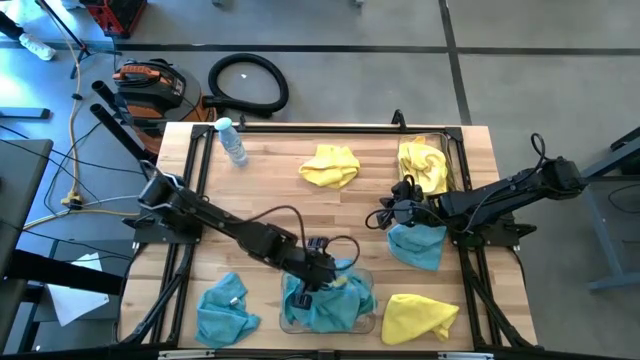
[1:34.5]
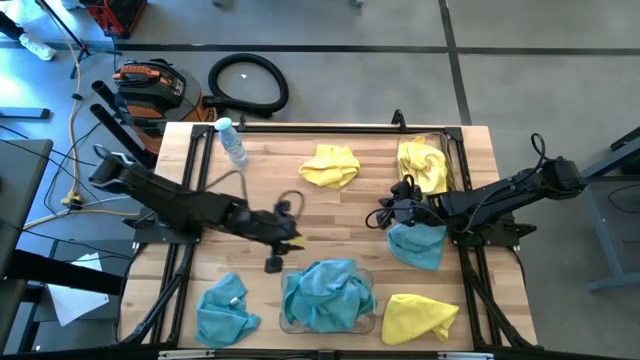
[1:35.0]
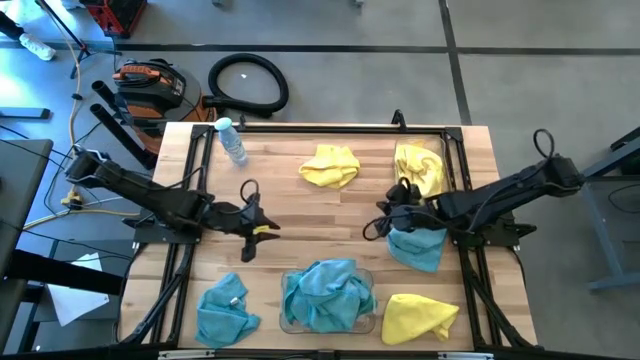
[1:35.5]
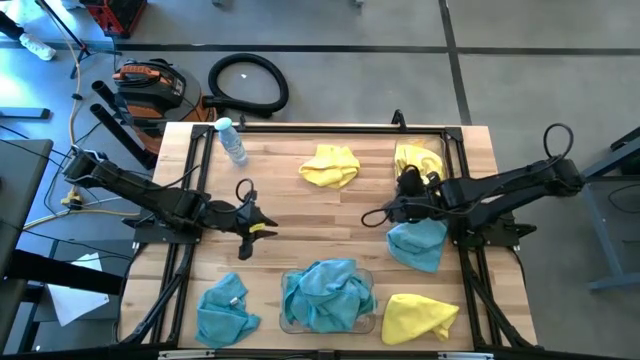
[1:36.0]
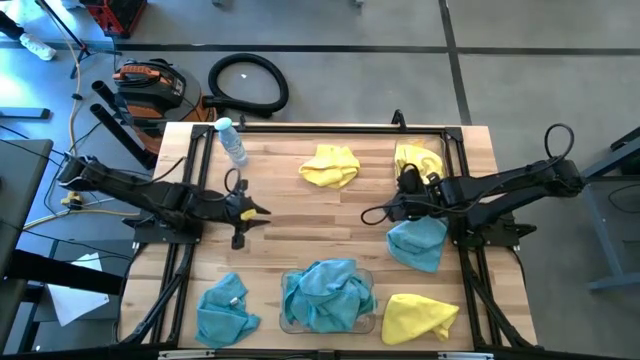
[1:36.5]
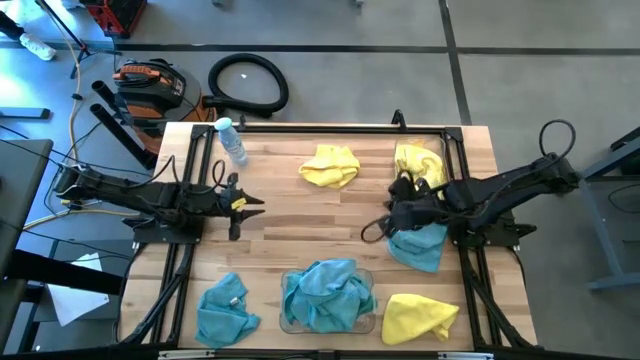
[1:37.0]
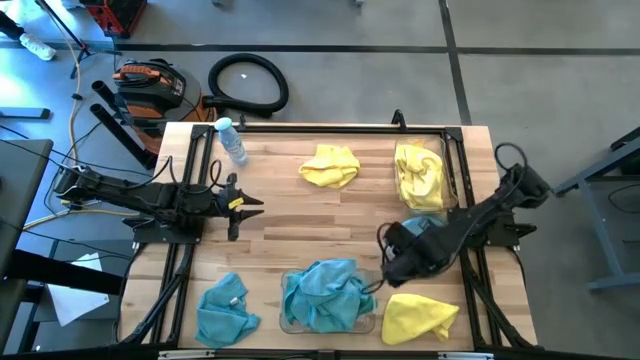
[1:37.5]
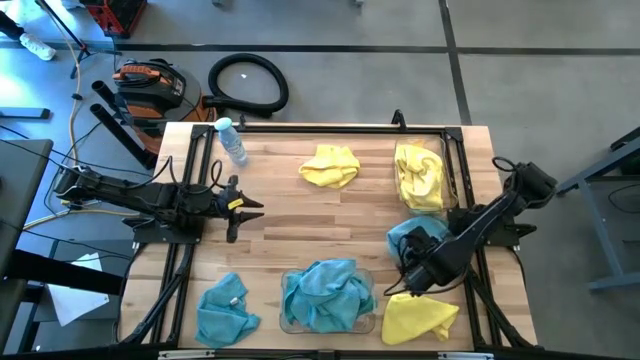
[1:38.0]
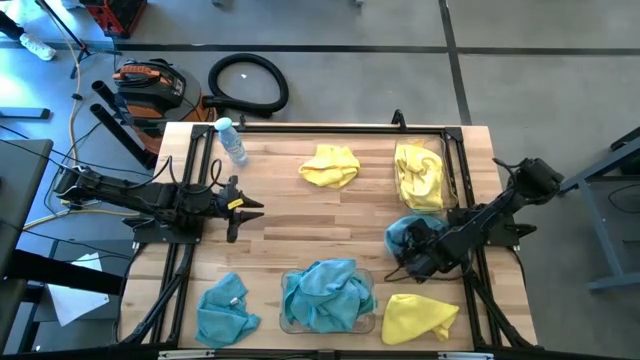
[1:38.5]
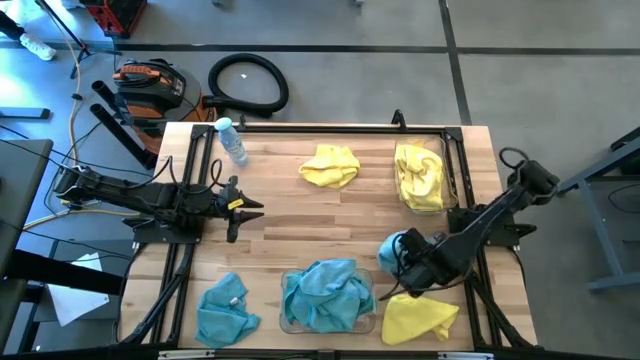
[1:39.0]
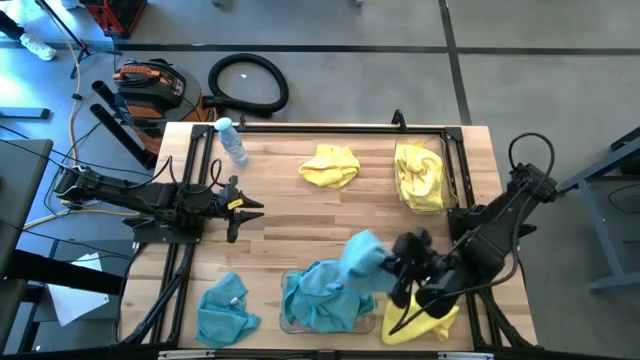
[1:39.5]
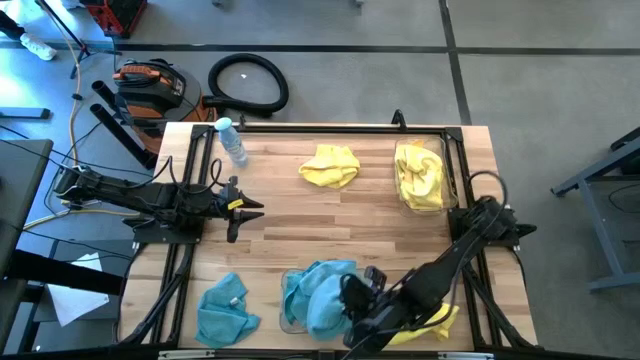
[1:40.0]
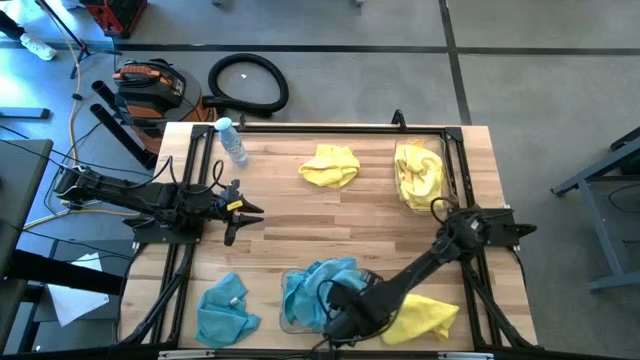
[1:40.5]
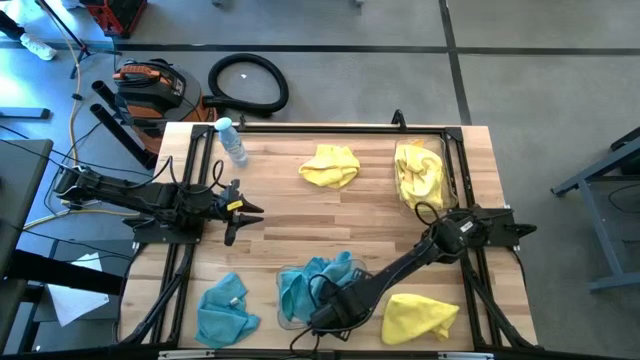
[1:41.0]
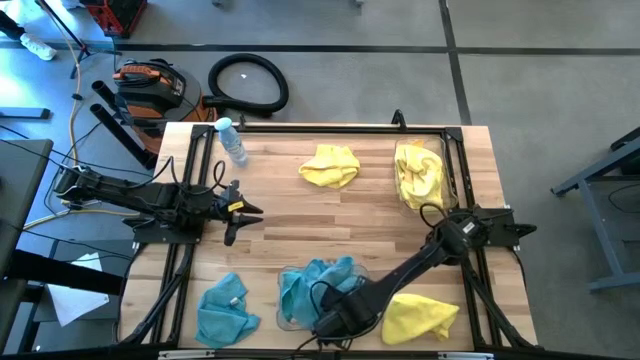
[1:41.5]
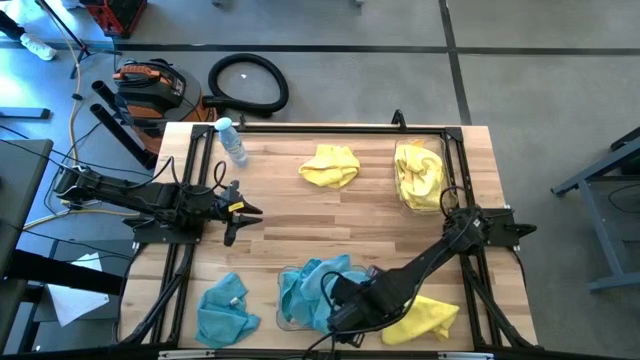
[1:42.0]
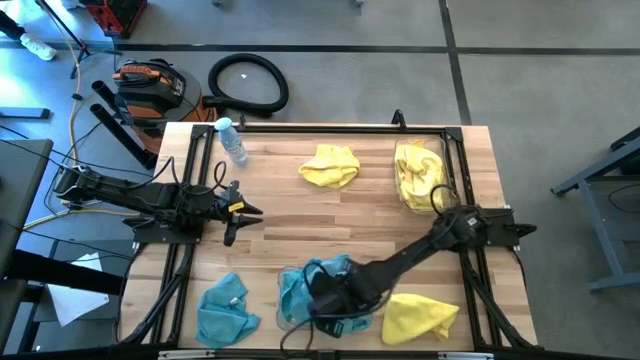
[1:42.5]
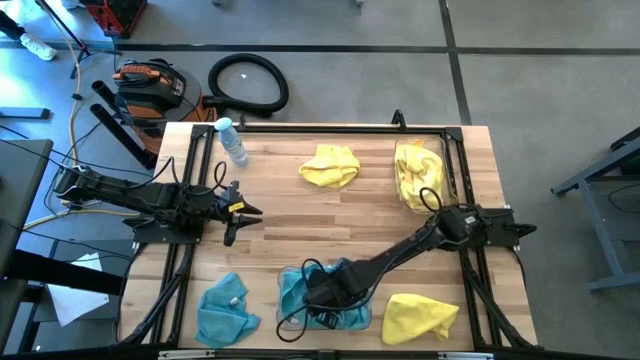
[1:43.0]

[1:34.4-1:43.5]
Task: Sort microfiber towel by color & place in baskets
Put the blue microfiber towel into the bottom transparent bin

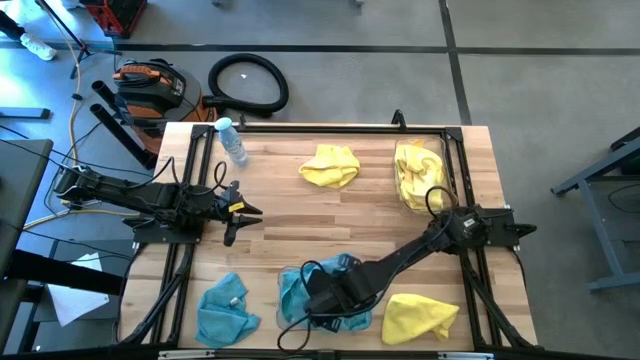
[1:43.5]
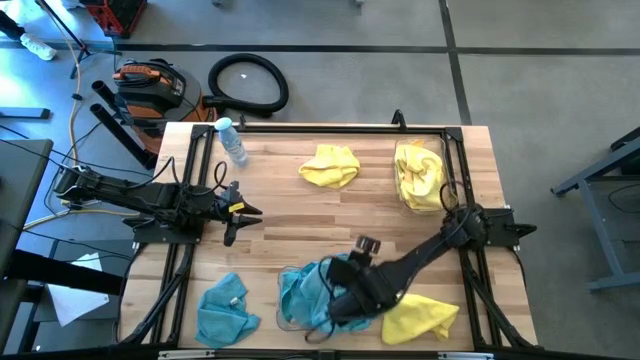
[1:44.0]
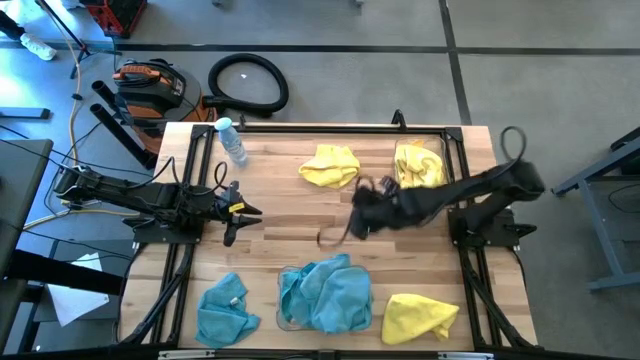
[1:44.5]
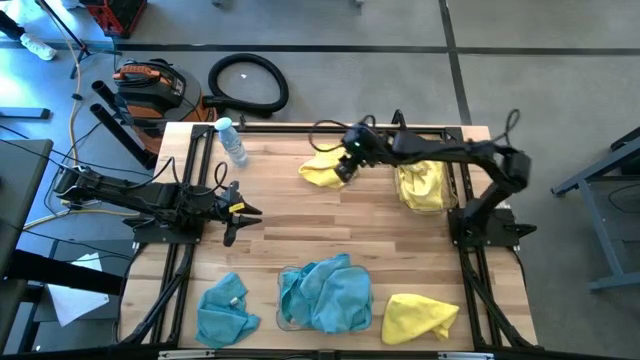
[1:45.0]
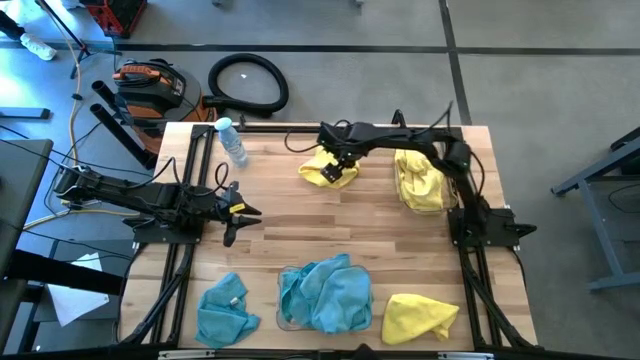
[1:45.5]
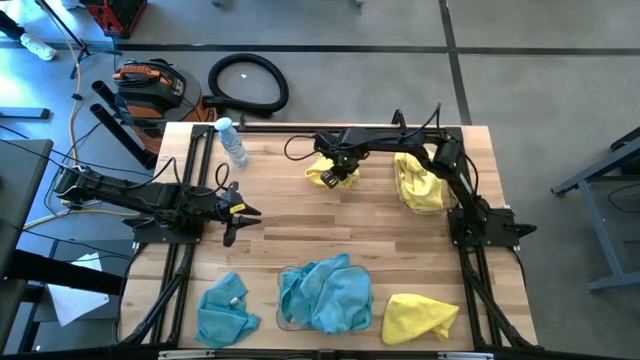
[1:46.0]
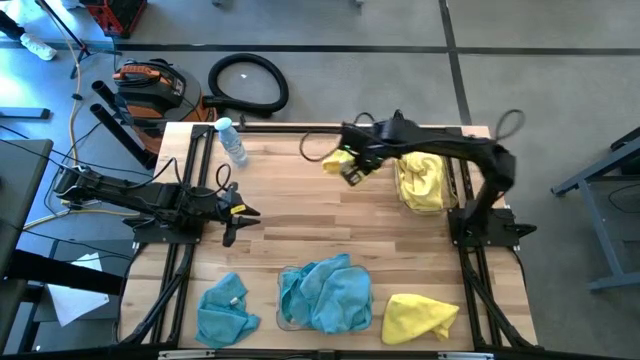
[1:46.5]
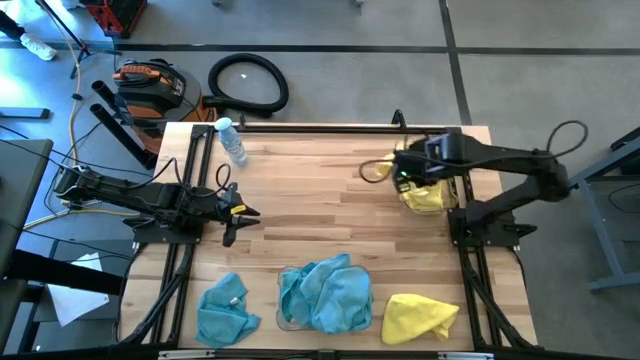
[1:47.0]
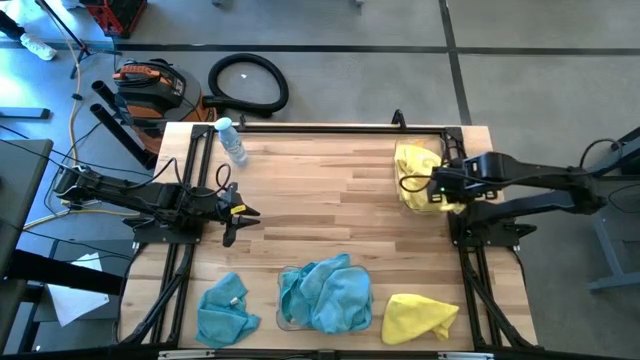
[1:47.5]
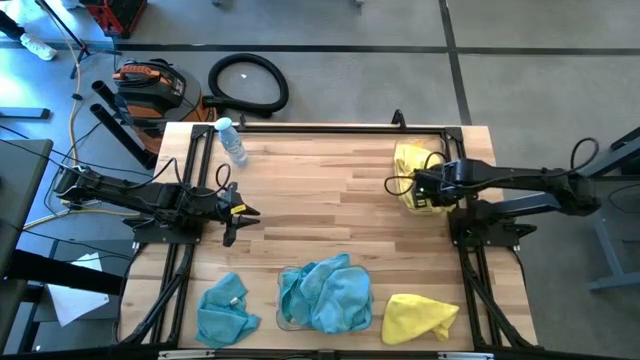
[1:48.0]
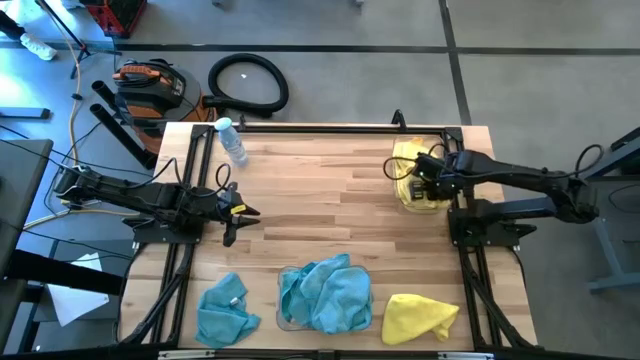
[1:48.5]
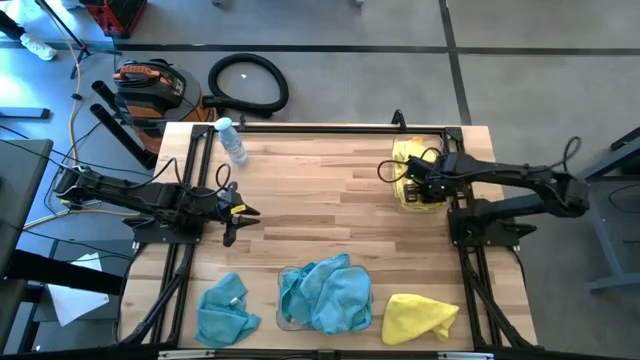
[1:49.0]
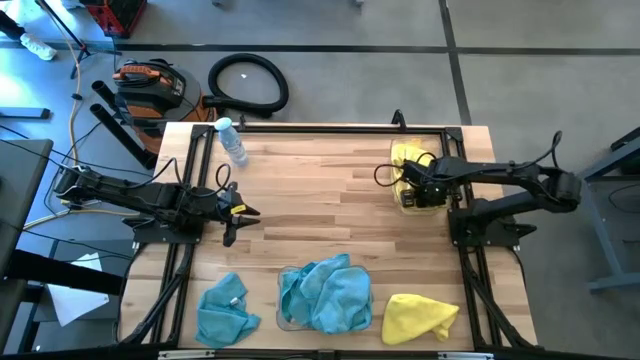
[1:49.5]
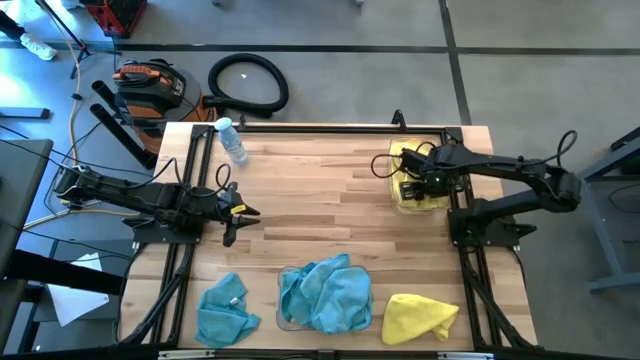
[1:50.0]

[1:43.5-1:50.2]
Put the yellow microfiber towel into the top transparent bin

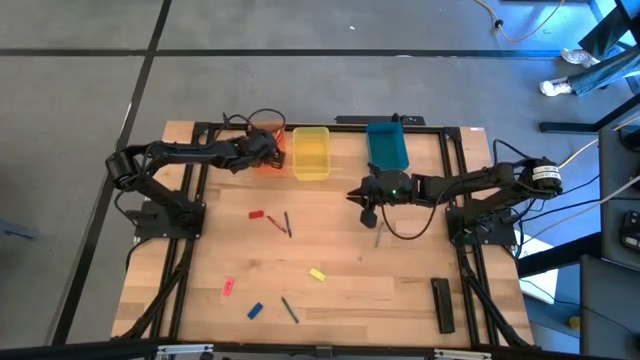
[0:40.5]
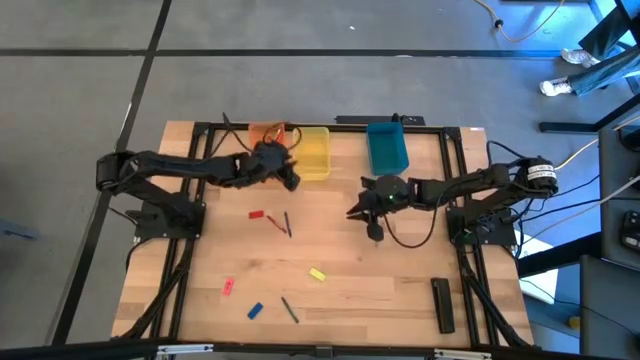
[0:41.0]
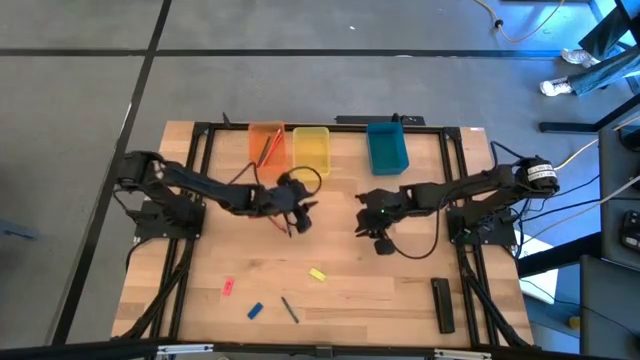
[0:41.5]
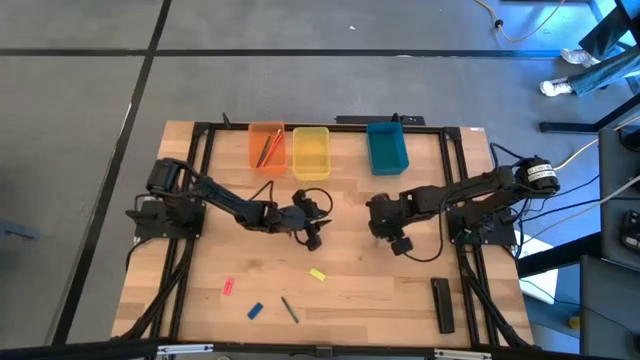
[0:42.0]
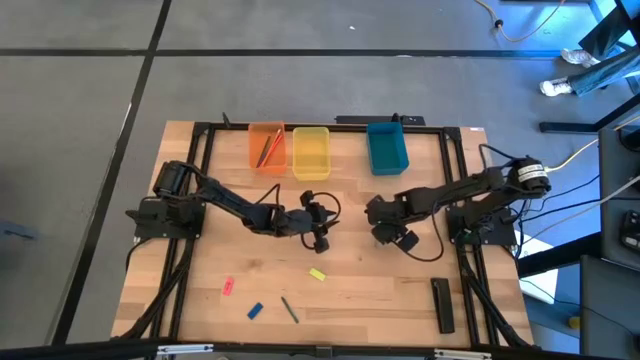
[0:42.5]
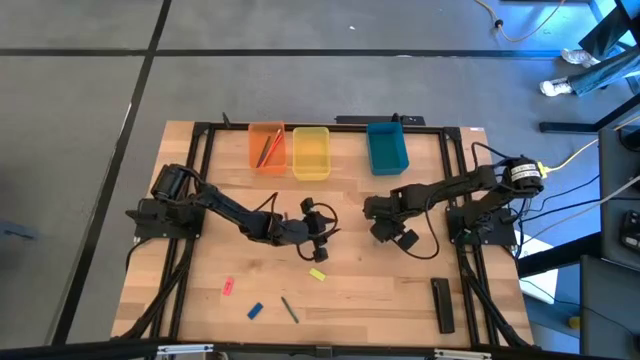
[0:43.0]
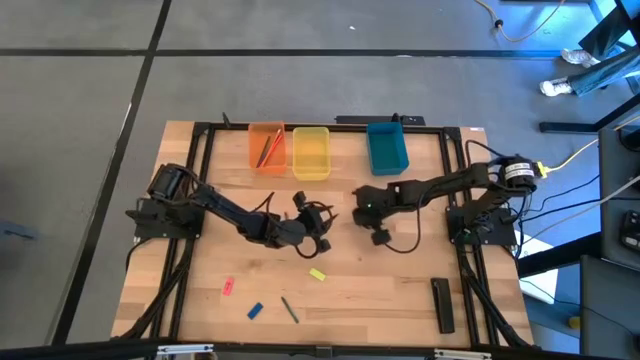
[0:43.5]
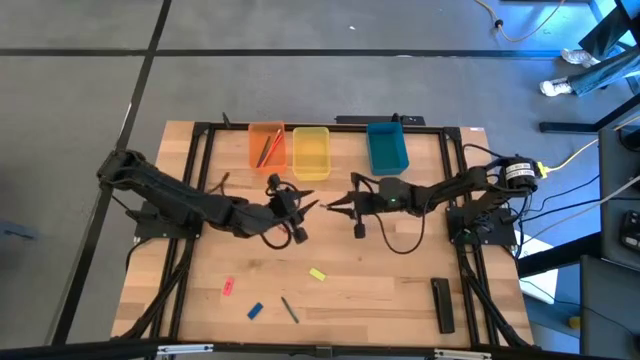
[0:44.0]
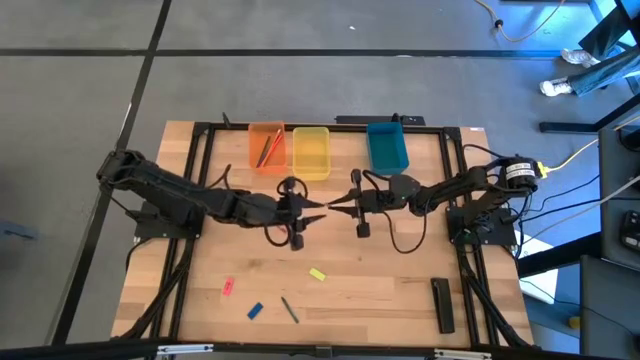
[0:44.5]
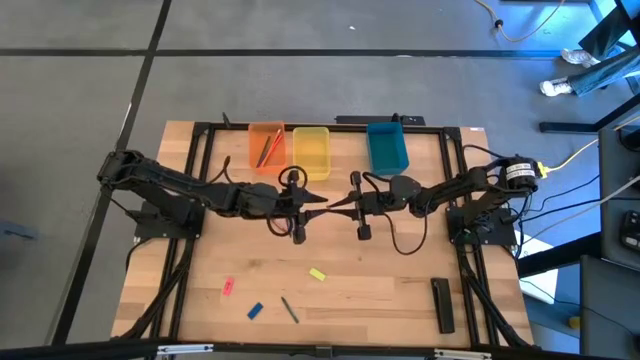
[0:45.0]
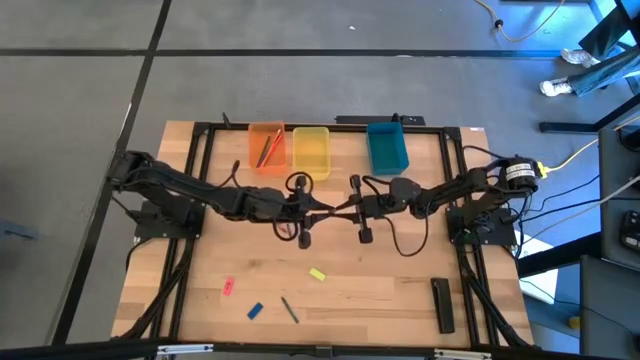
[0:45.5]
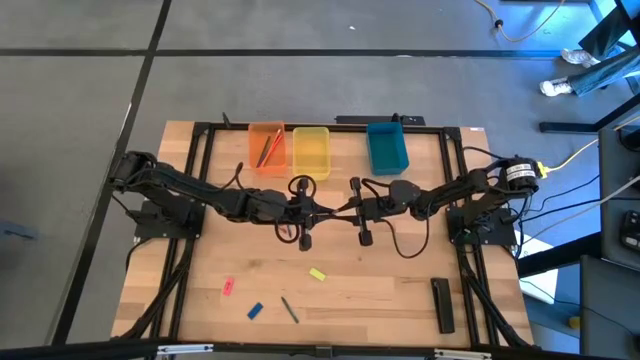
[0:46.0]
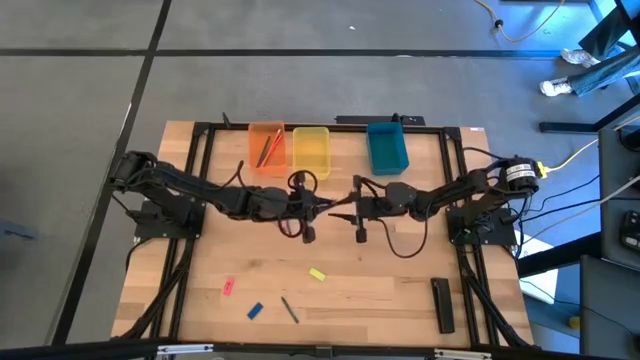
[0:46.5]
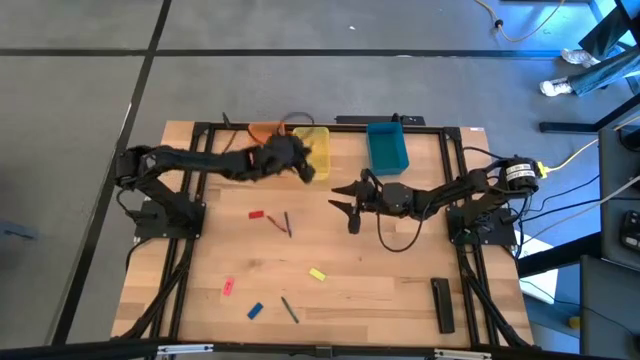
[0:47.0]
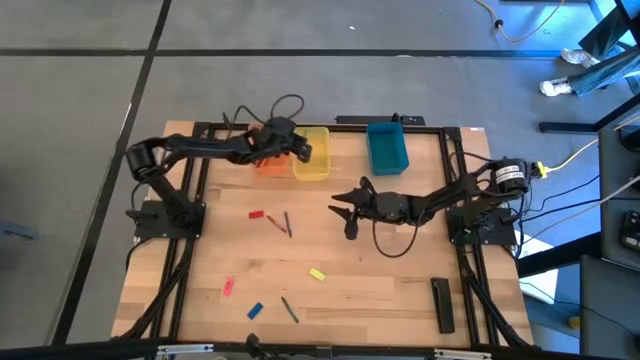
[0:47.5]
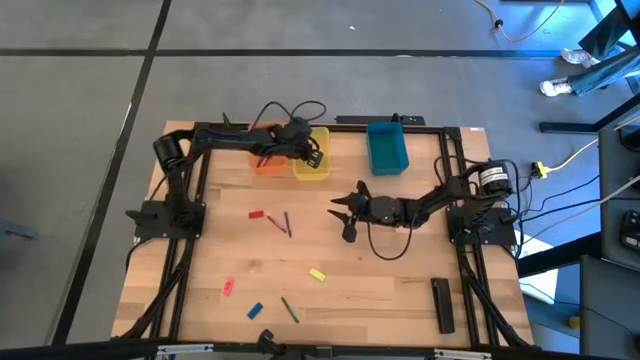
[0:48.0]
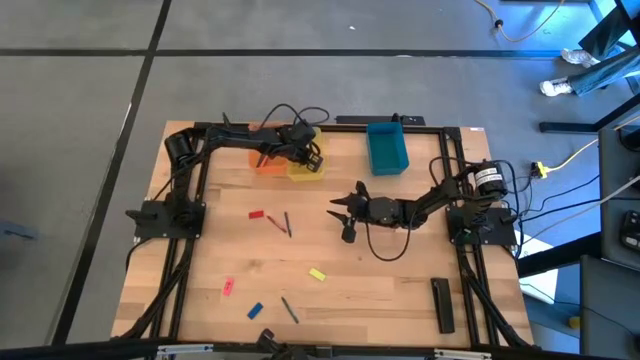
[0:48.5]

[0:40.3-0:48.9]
Task: Sort crayons/erasers/pens/pencils in bins
Put the gray crayon into the yellow bin
